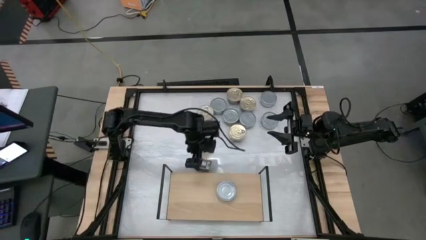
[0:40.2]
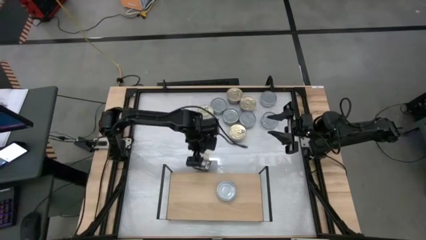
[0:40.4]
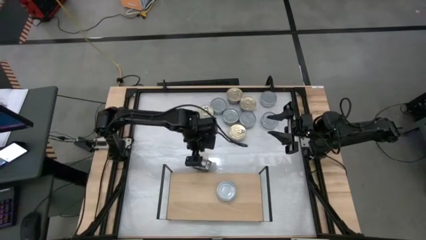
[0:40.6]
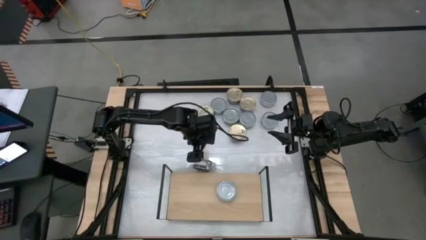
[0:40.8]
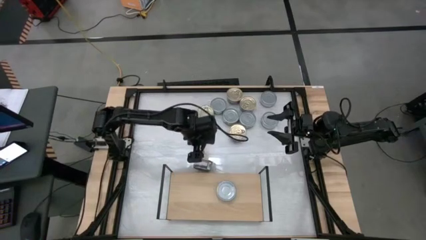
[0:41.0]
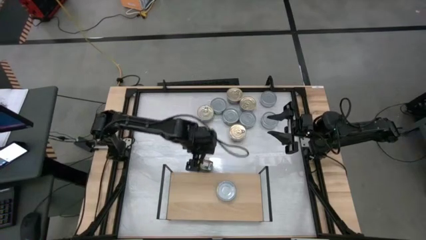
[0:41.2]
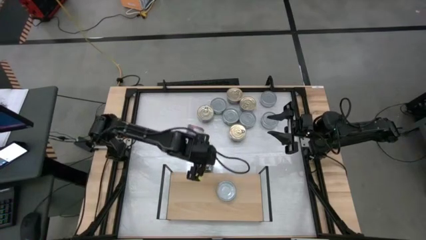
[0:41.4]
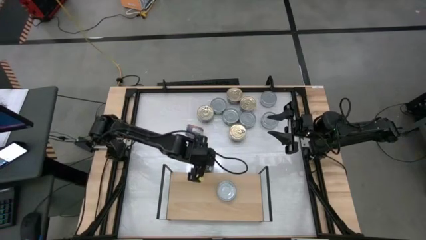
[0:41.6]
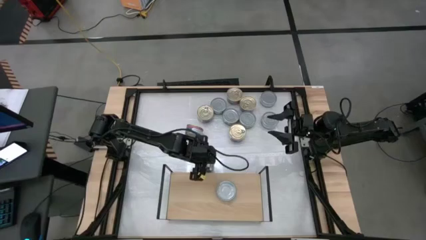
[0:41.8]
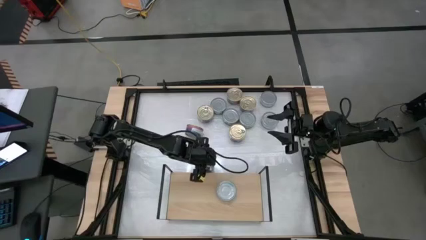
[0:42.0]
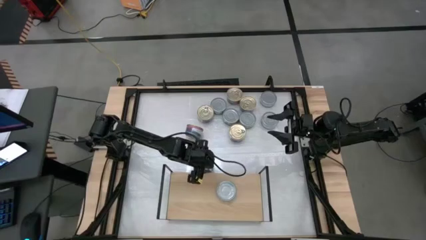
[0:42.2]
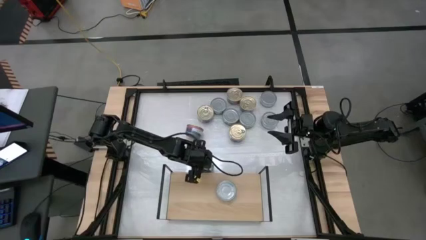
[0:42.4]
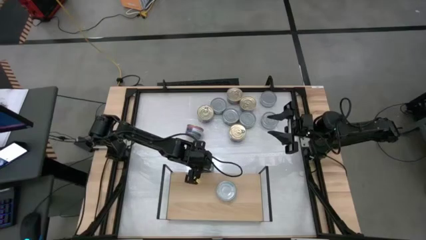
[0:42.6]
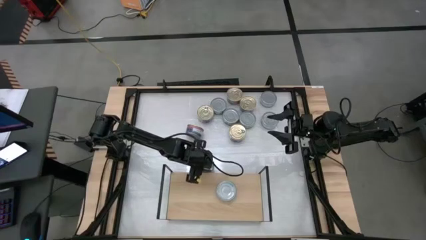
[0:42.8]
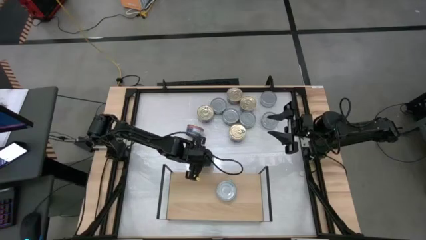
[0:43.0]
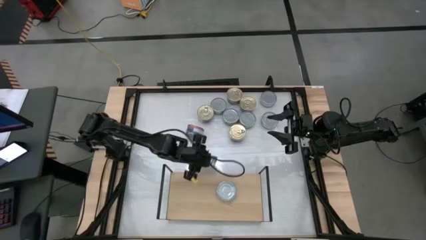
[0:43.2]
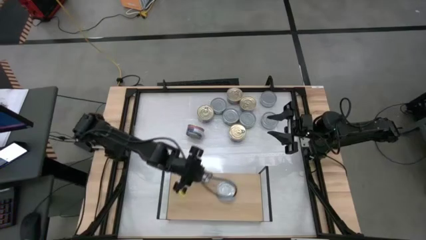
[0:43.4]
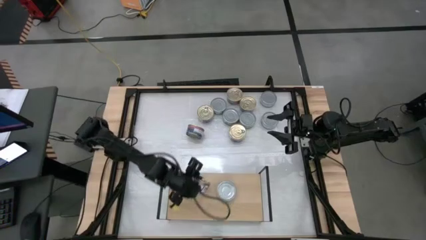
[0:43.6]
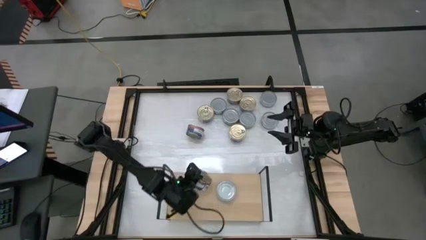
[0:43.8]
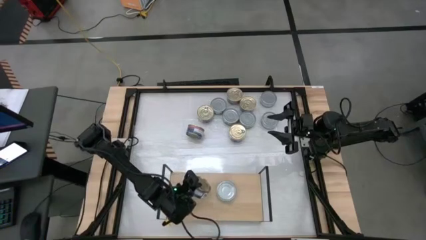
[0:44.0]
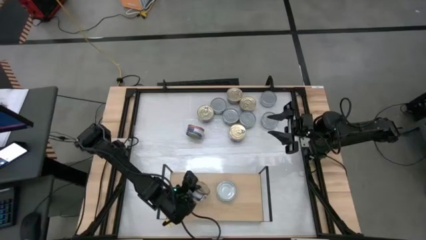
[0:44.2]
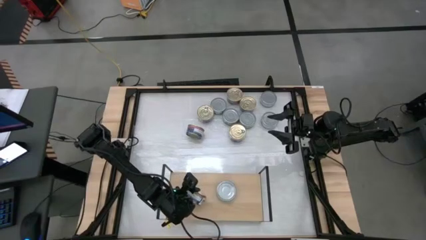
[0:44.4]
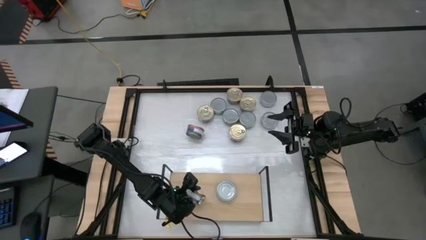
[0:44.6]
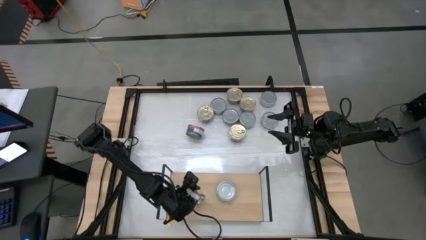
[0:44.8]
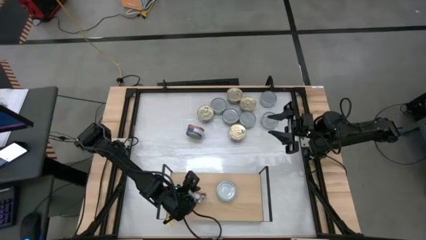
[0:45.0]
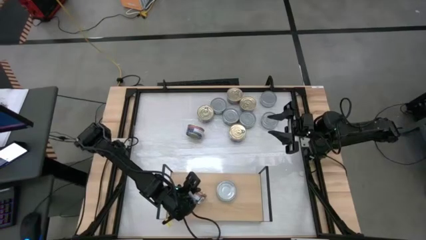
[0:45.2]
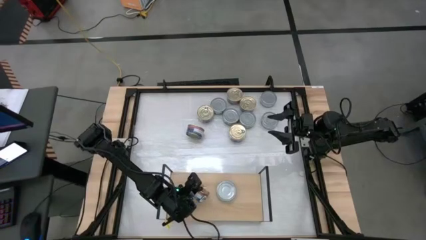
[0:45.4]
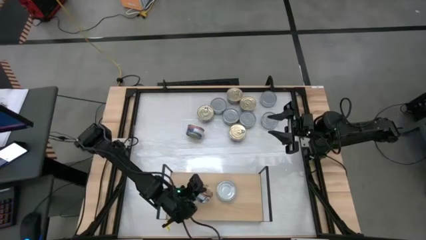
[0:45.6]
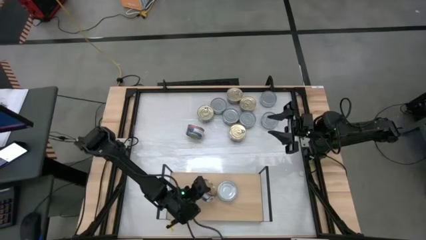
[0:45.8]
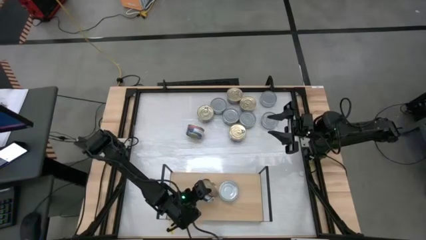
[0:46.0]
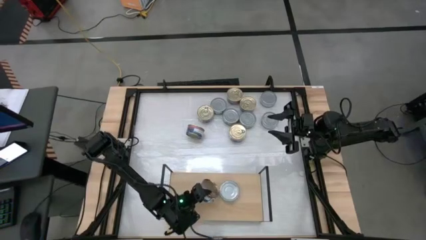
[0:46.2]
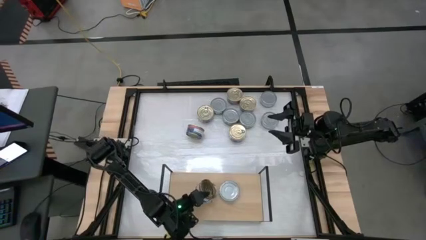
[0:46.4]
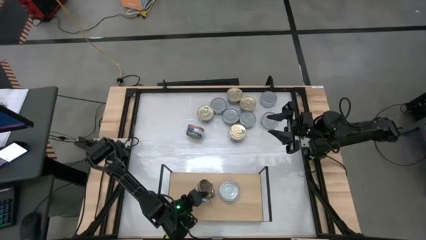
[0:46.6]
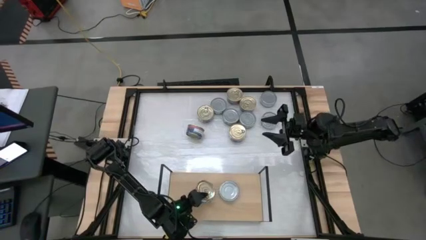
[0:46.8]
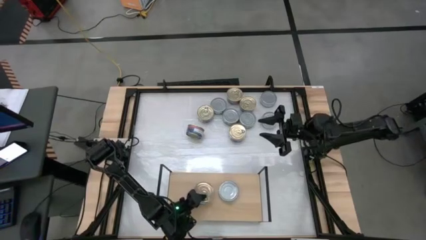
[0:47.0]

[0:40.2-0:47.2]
Task: Stack canned seafood by type on shelf
Put the blue tuna can on the shelf

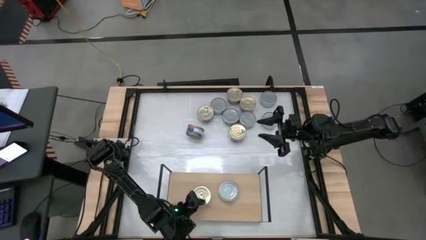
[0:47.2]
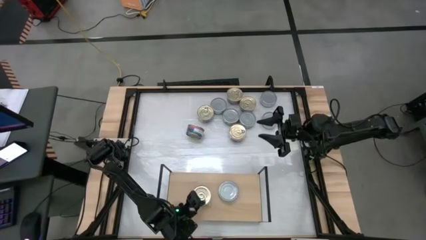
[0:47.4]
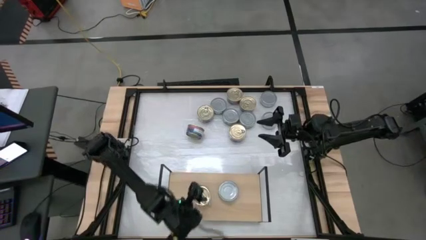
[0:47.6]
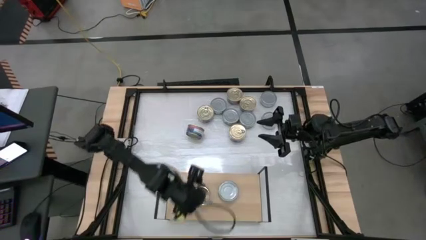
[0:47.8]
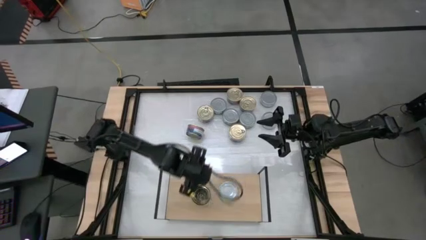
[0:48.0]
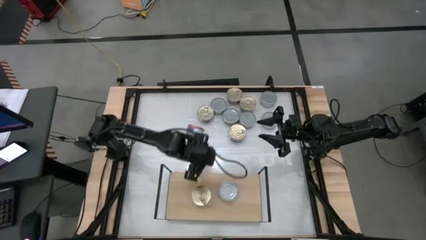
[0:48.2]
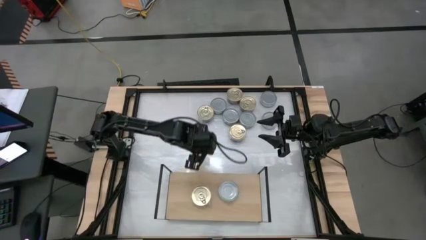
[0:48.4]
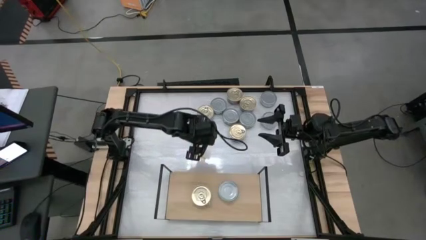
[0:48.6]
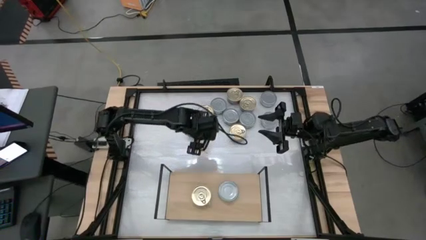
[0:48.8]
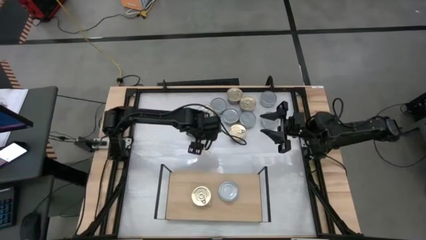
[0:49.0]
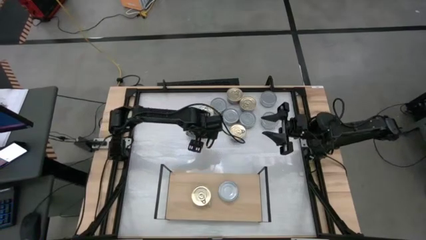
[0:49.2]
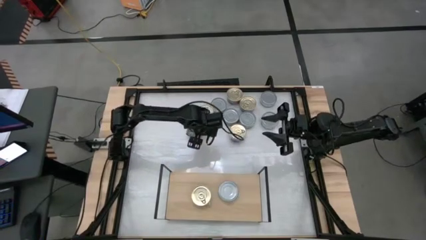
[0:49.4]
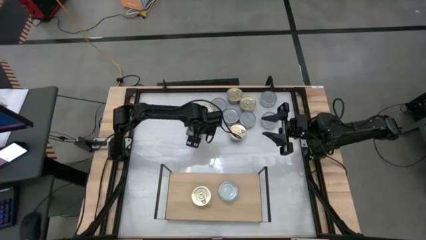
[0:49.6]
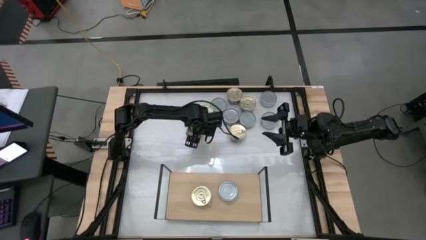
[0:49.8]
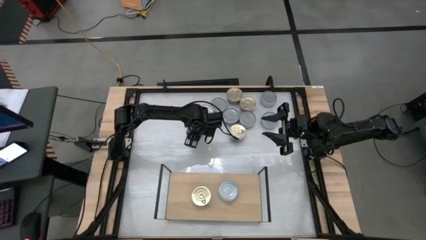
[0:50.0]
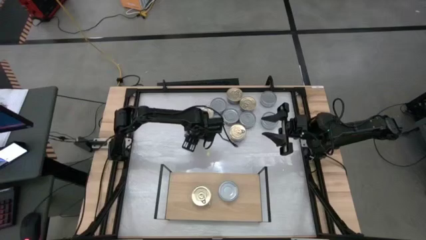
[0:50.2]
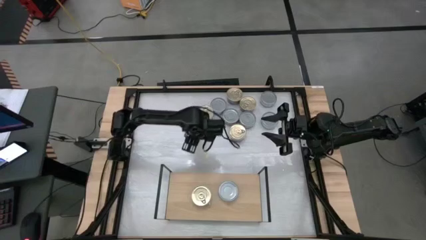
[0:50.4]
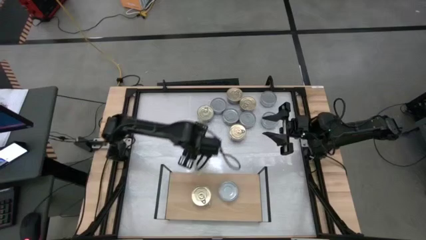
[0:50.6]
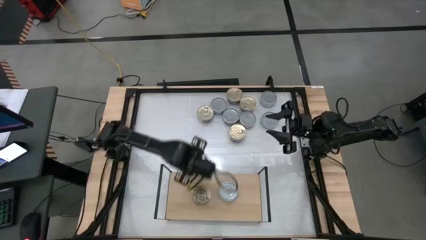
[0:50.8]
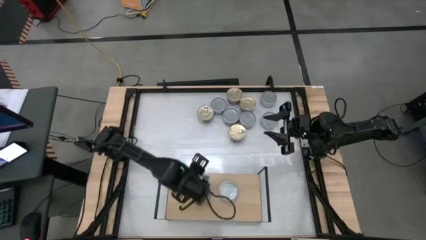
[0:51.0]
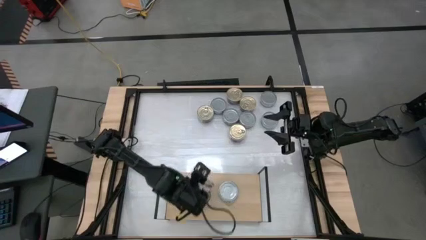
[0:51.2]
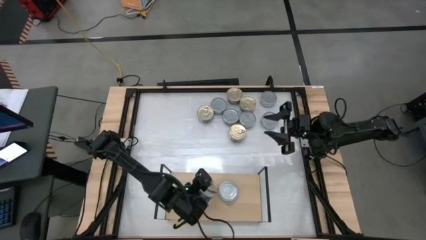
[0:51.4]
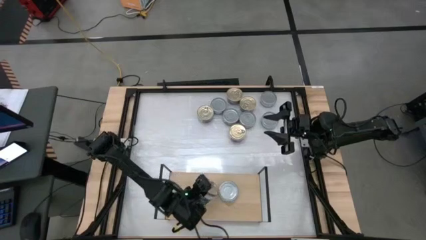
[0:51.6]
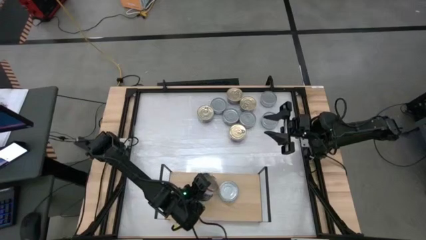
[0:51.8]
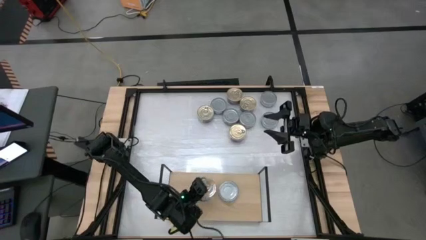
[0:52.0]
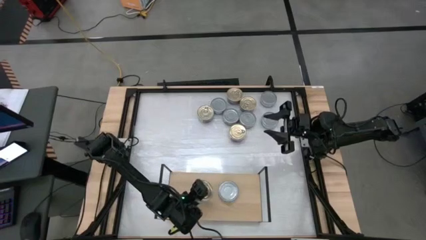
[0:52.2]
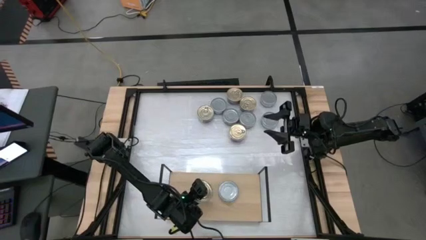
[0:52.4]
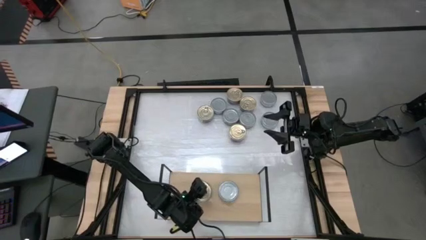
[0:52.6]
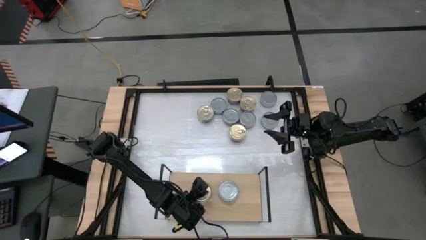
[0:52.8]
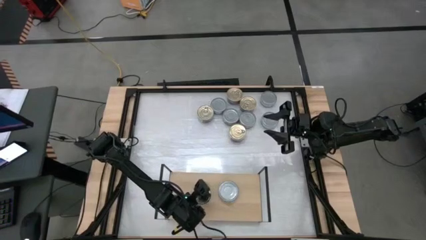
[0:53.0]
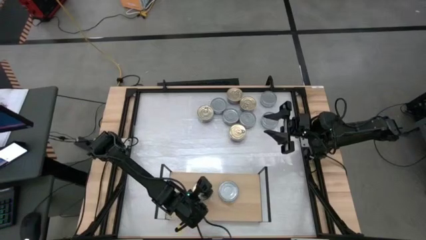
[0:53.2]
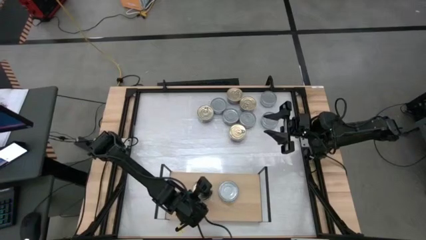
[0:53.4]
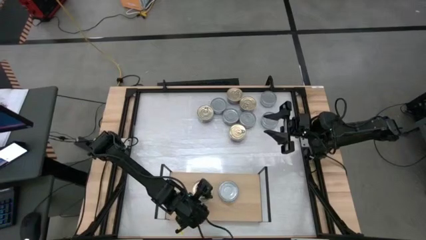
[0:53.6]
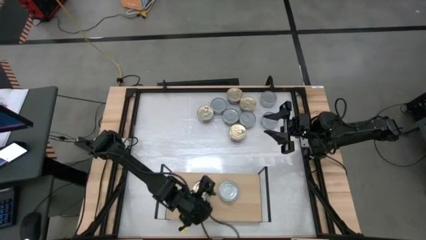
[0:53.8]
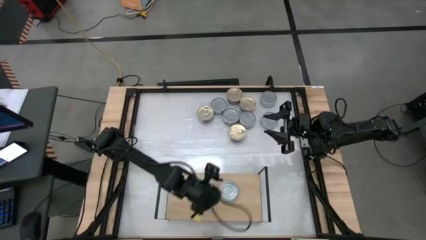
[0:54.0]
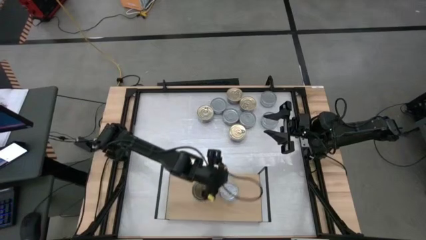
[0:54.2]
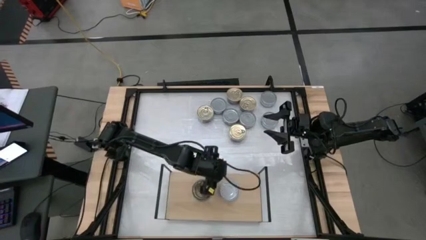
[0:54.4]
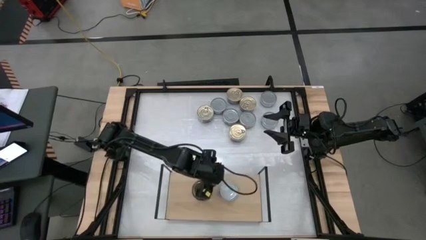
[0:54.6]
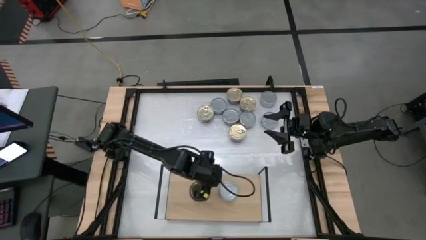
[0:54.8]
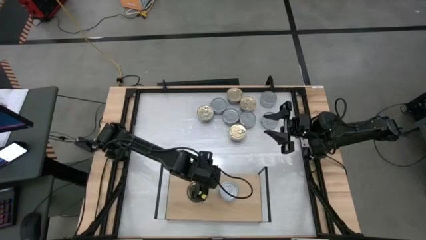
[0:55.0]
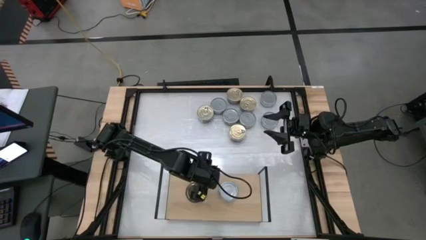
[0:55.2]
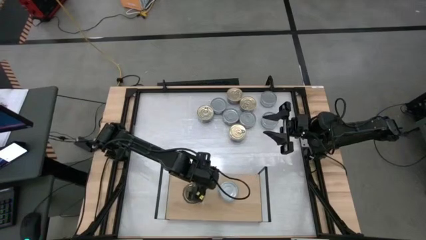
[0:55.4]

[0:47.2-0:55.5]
Stack the blue tuna can on top of the blue tuna can on the shelf
